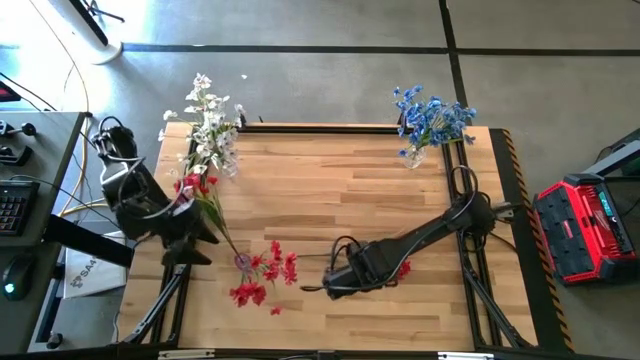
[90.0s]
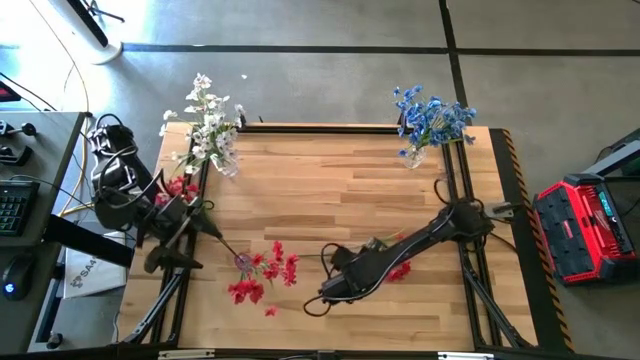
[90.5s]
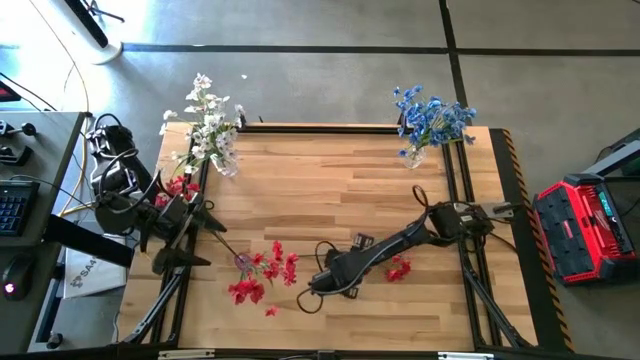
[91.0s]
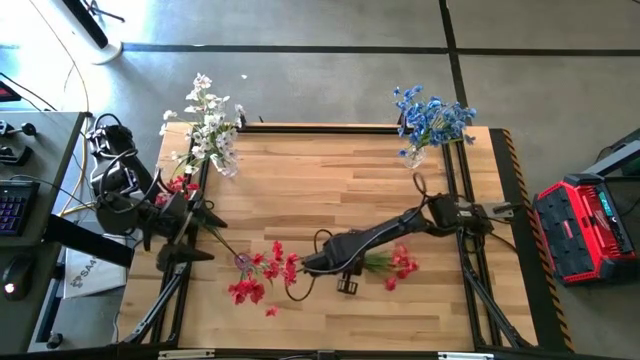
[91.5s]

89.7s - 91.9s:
Task: Sort flowers into vase by color
Put the red flowers into the purple vase

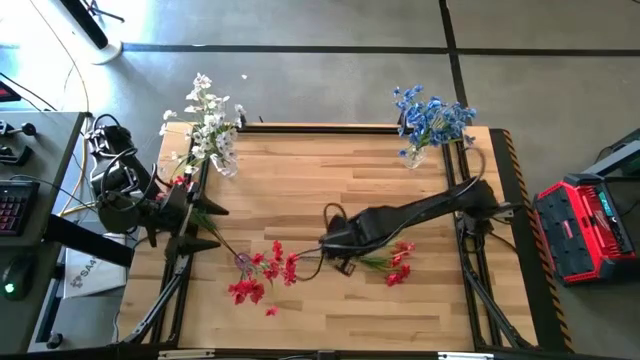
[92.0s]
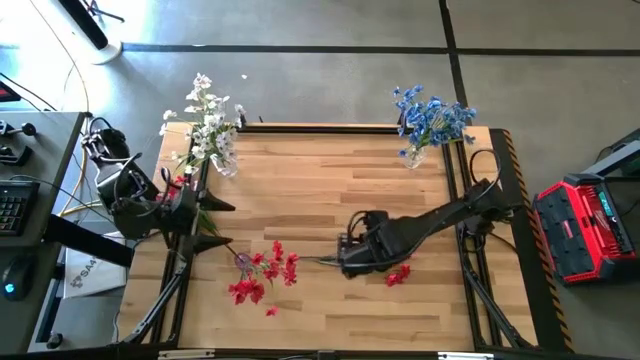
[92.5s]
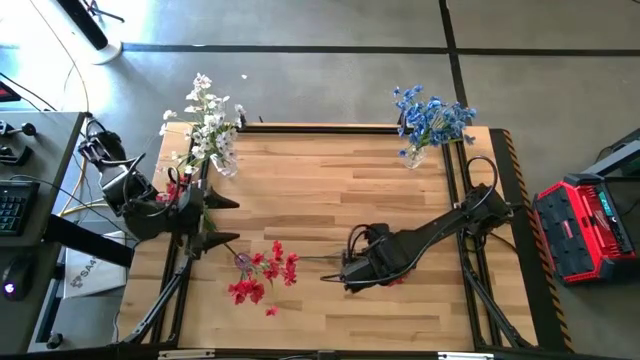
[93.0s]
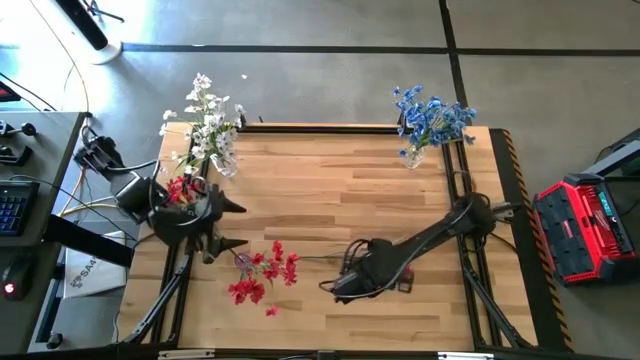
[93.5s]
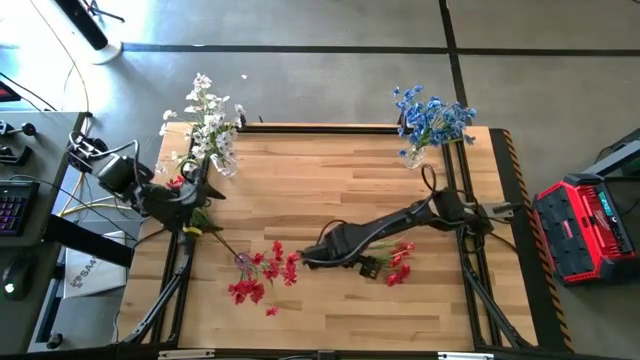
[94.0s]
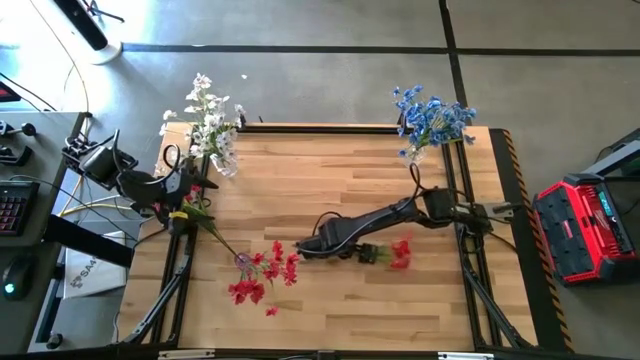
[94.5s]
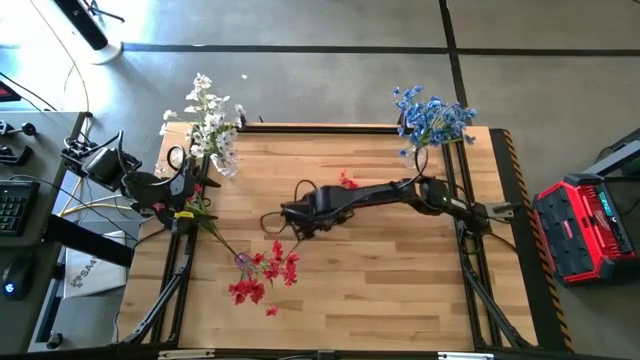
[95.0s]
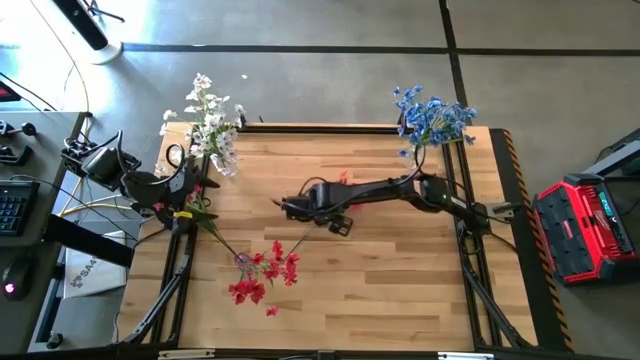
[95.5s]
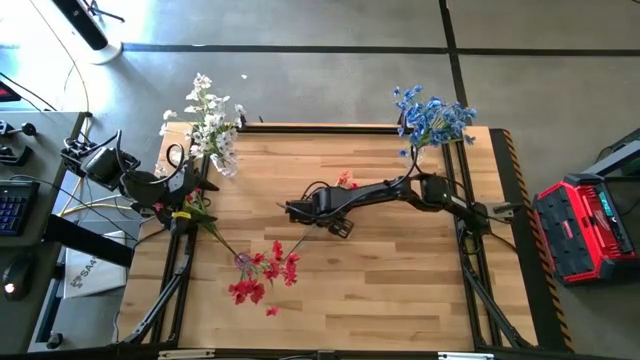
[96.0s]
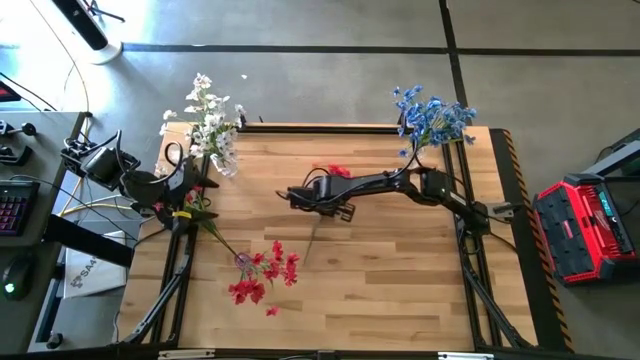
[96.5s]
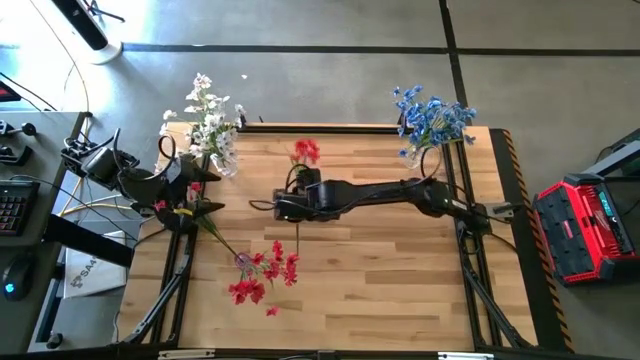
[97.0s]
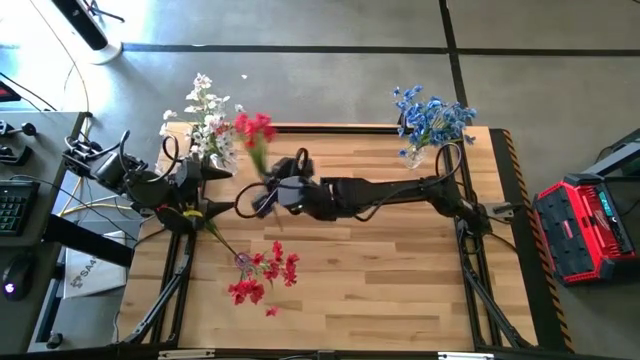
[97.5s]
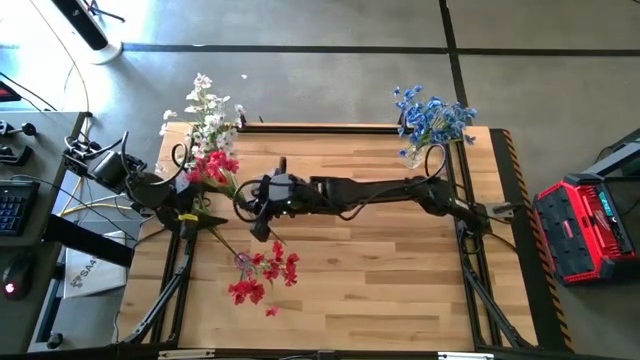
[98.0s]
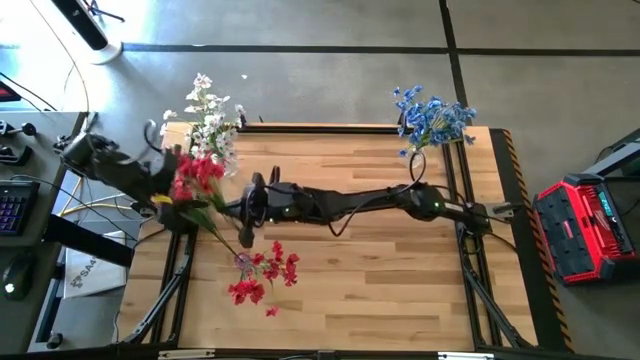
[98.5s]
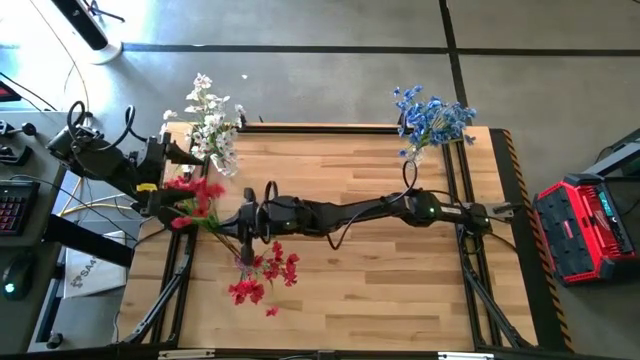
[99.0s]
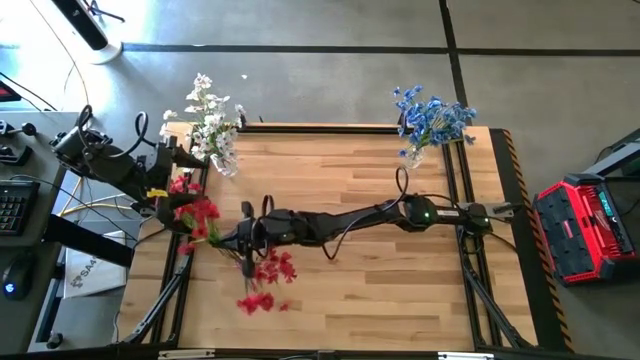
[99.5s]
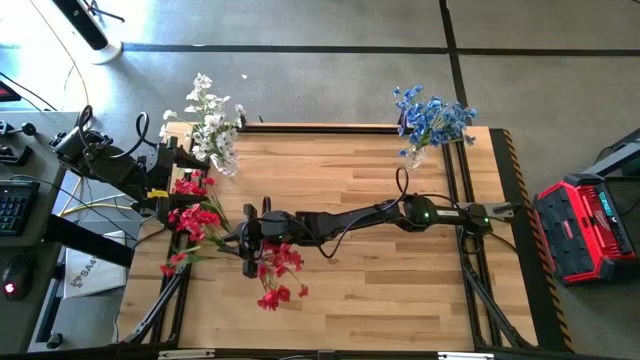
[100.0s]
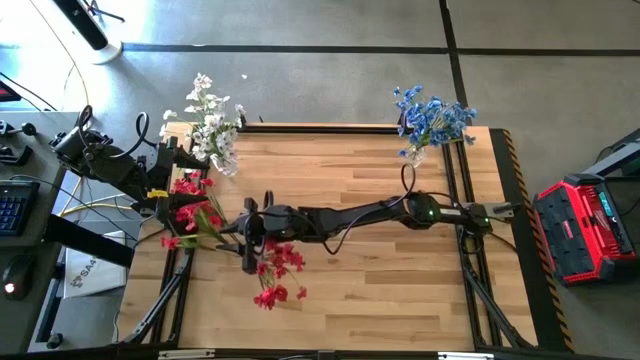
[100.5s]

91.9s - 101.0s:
Put the red flowers into the purple vase

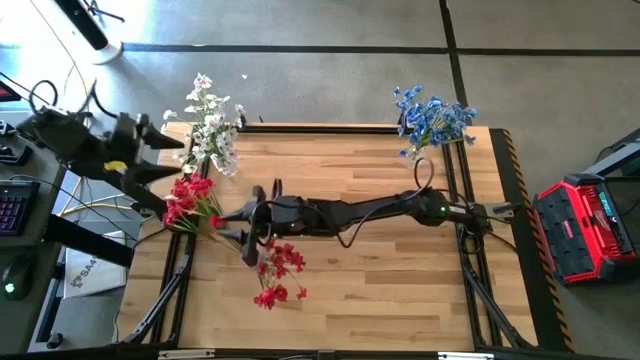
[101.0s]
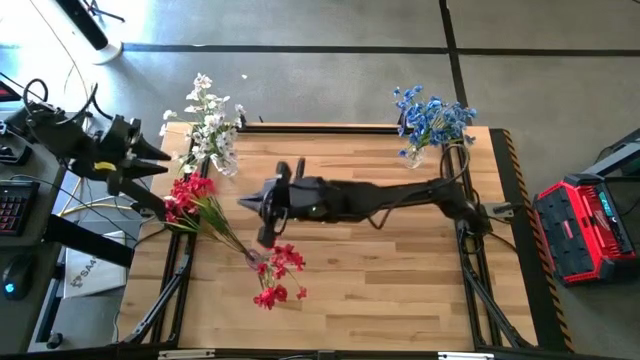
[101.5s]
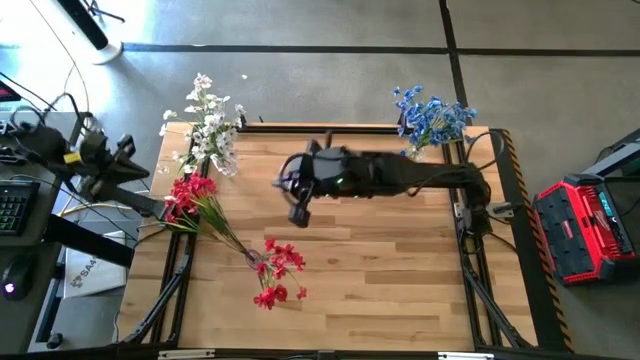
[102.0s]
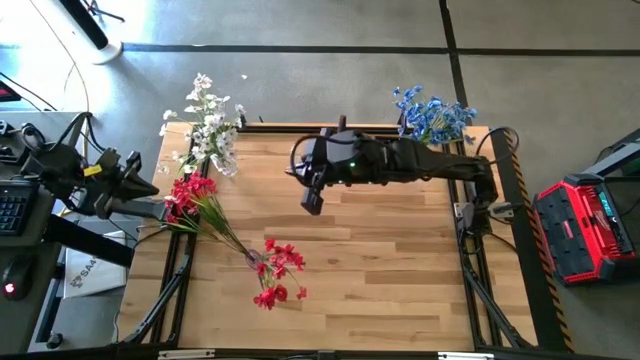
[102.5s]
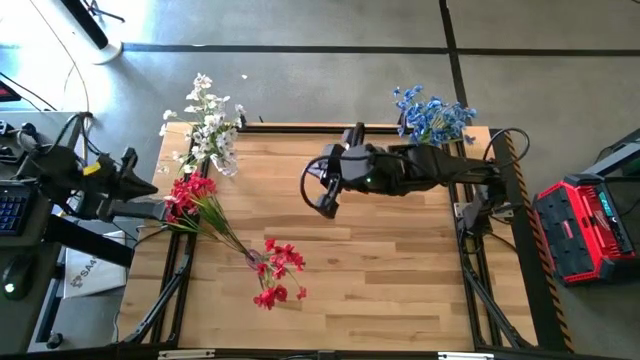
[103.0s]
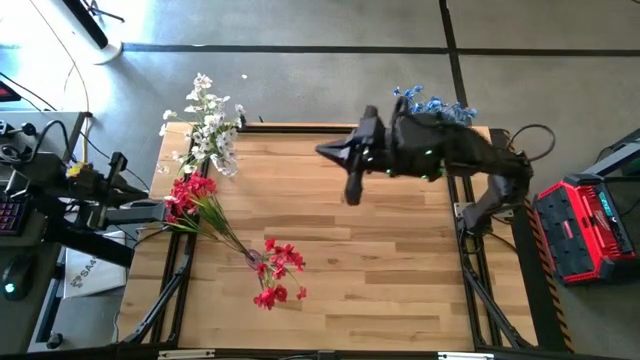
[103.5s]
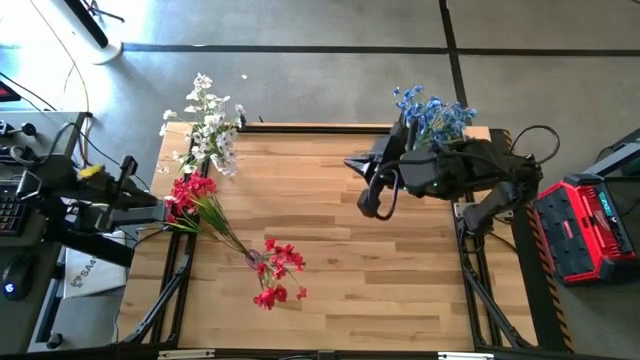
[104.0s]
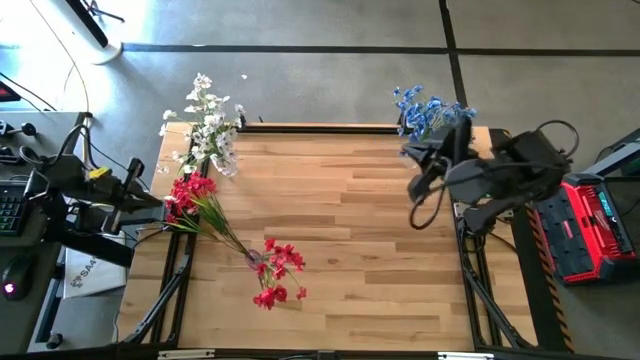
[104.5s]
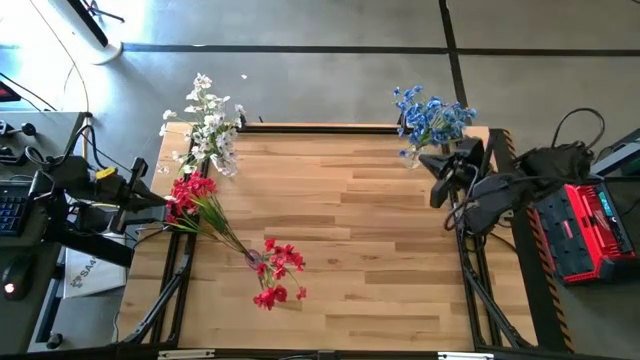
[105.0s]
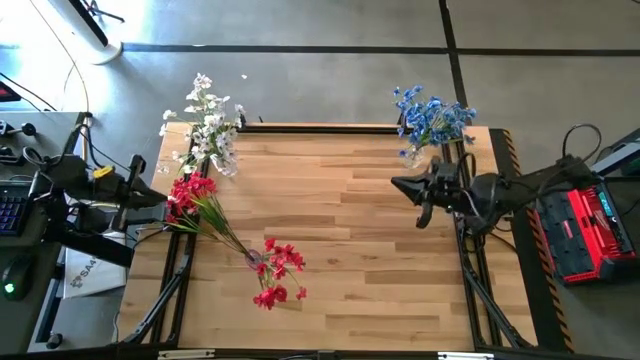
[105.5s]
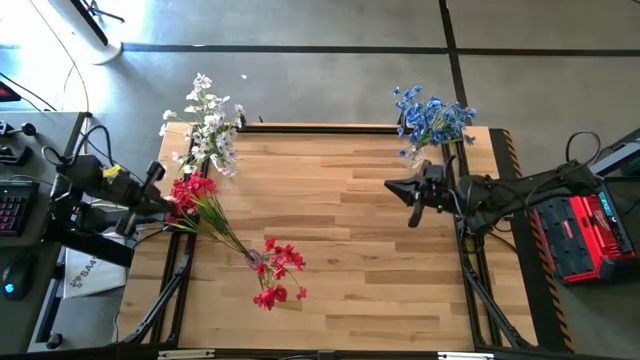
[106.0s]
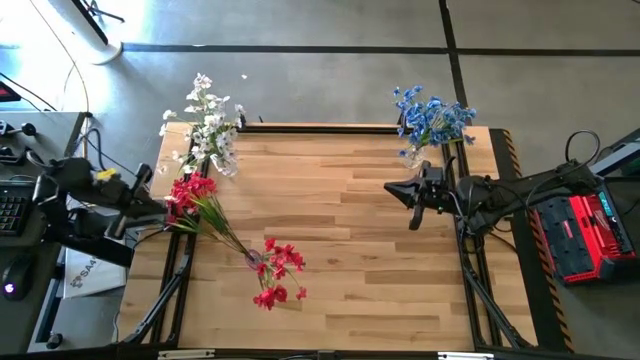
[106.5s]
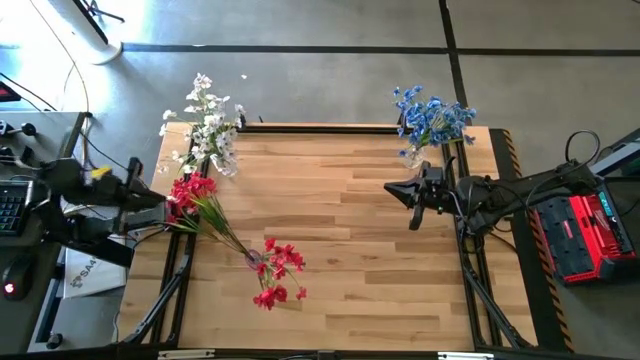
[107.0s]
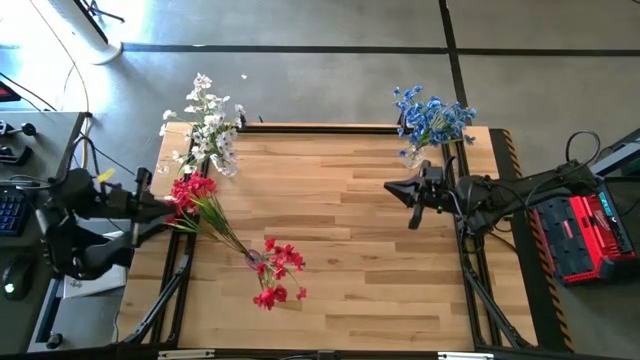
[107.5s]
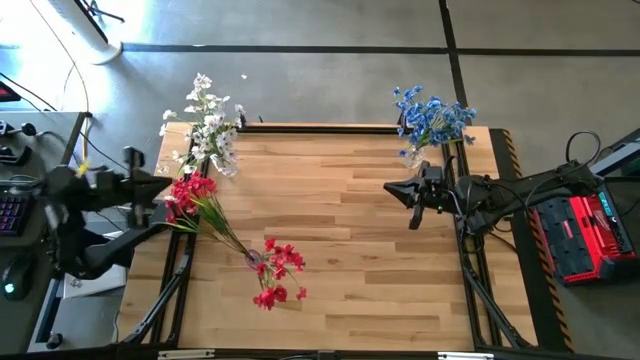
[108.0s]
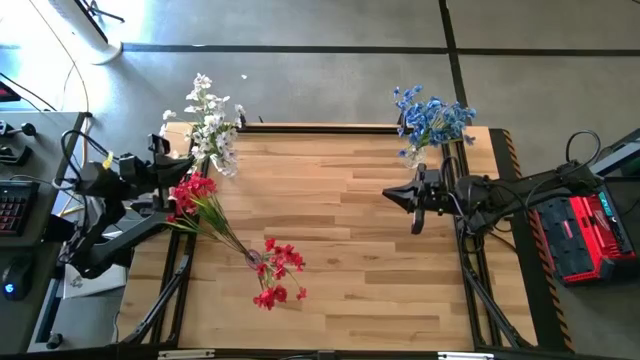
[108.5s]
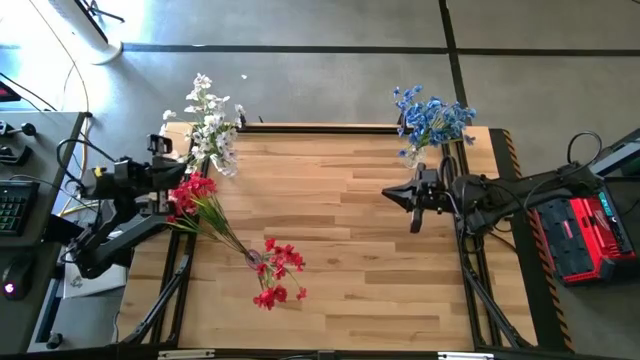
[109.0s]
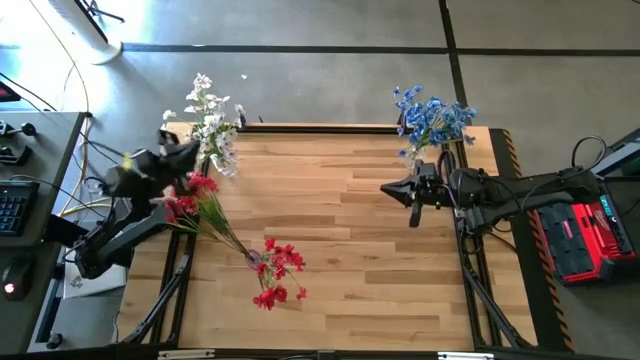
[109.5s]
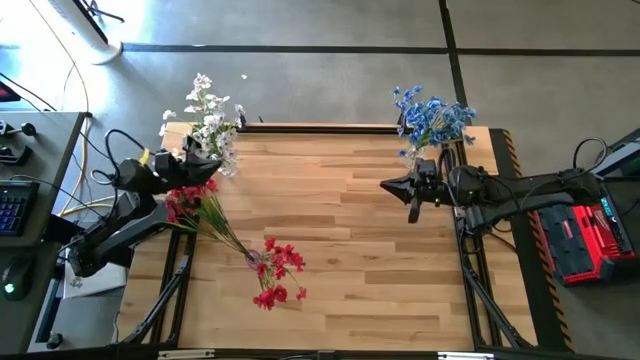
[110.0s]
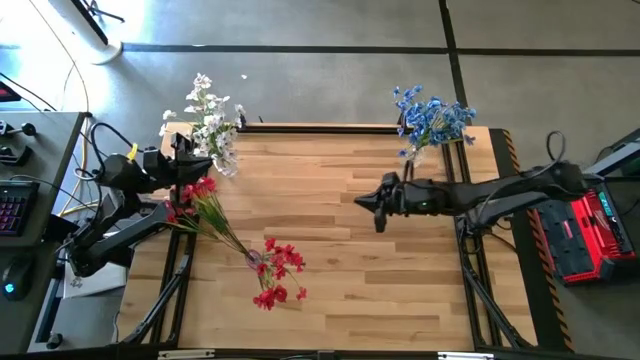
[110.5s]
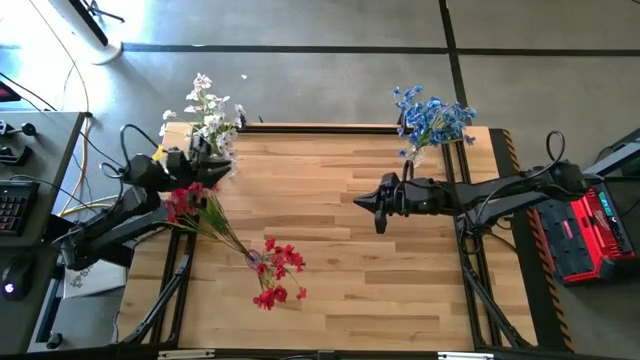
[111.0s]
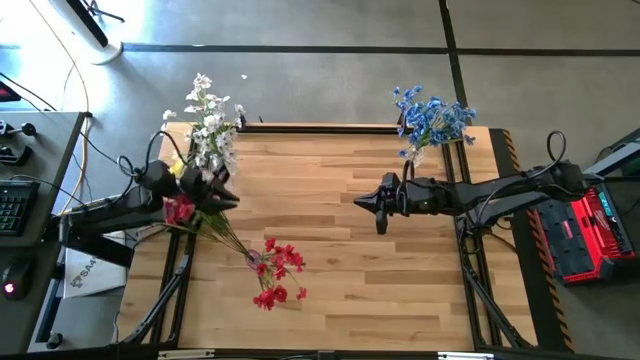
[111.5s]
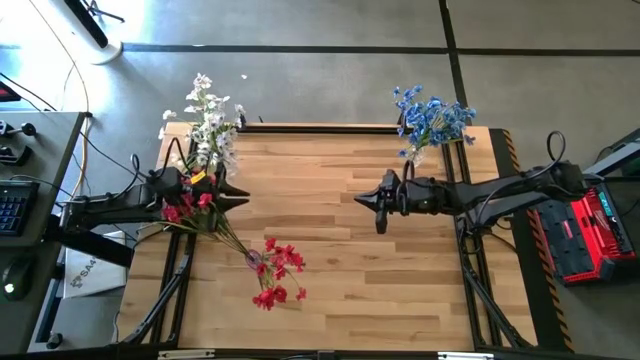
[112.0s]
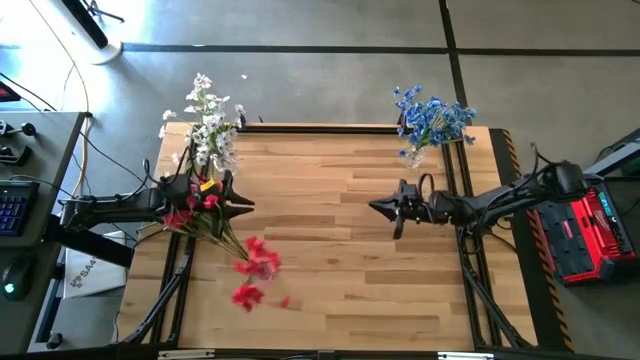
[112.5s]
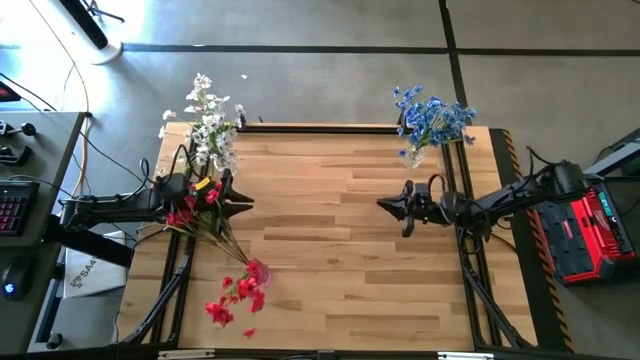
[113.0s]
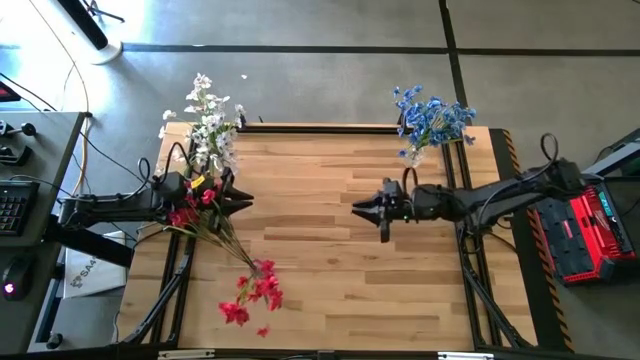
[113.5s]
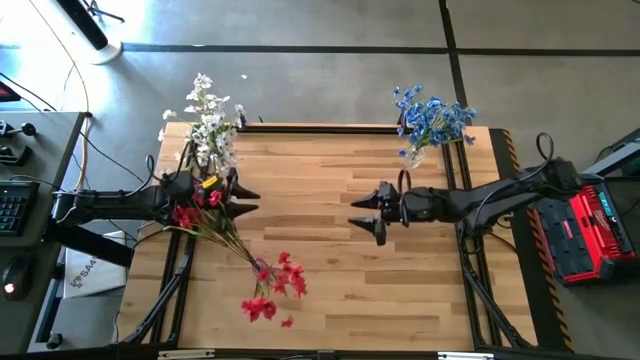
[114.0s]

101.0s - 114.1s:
Return to Home Position
